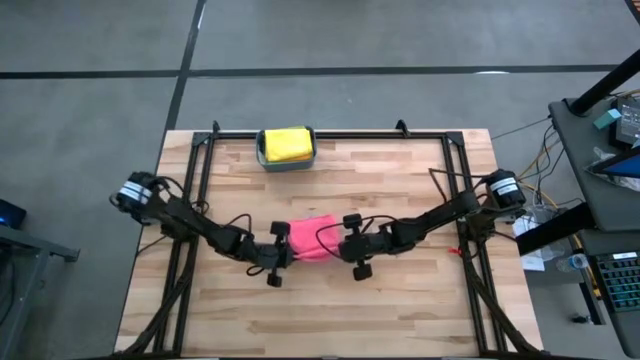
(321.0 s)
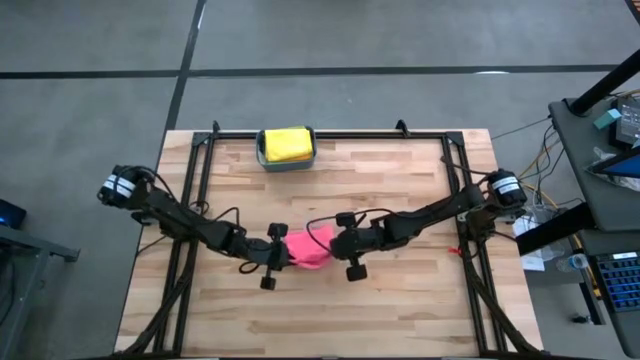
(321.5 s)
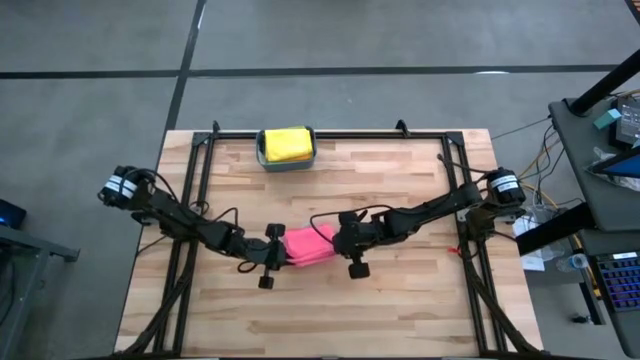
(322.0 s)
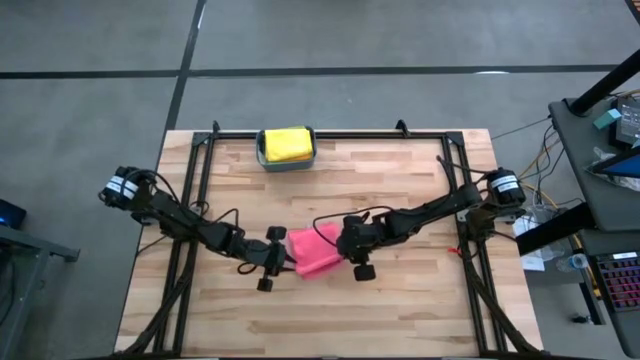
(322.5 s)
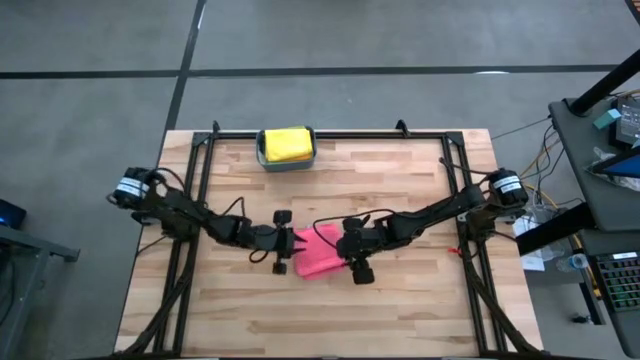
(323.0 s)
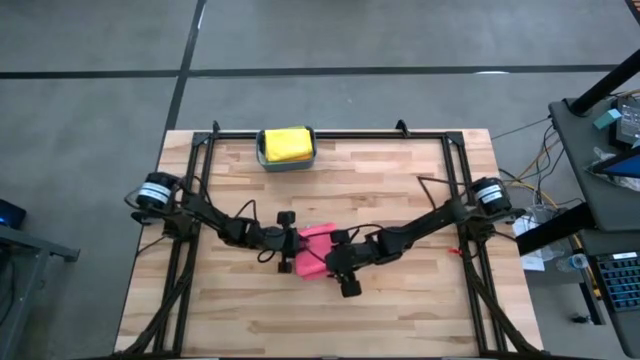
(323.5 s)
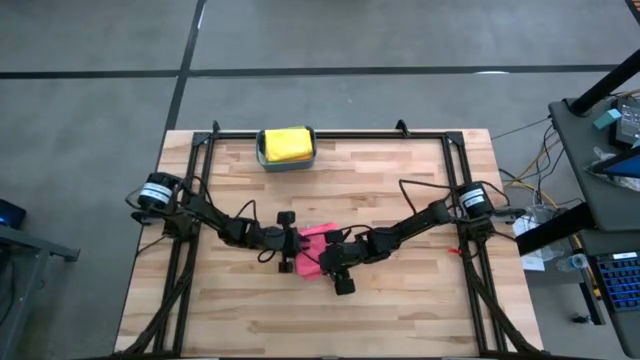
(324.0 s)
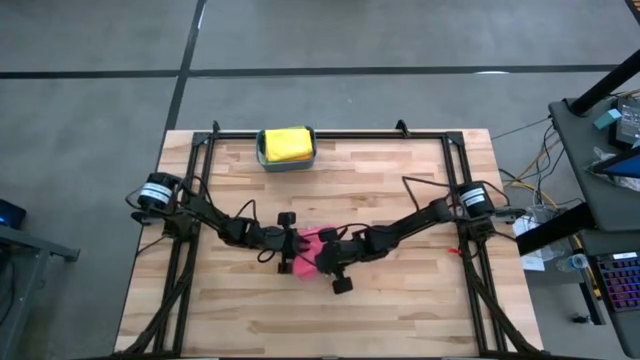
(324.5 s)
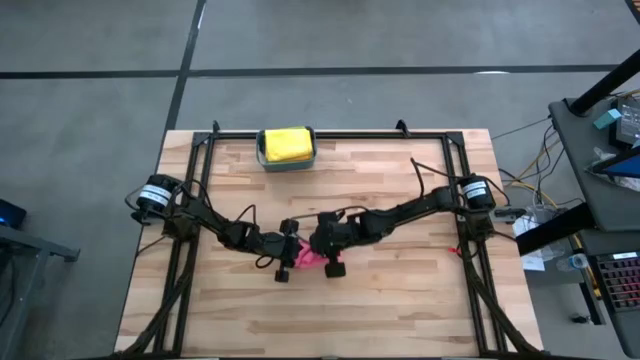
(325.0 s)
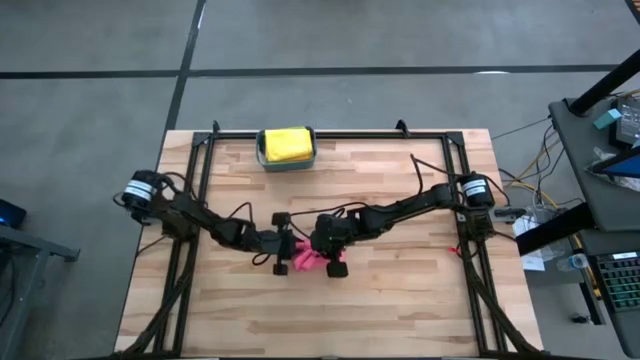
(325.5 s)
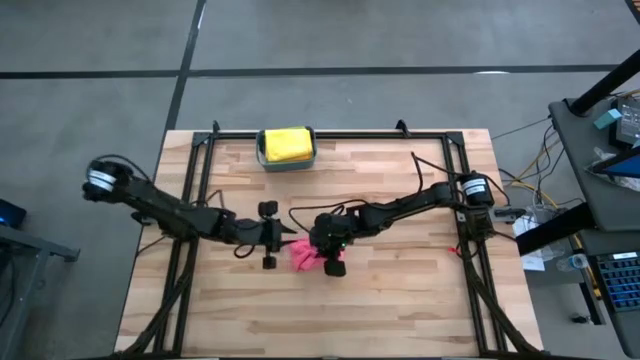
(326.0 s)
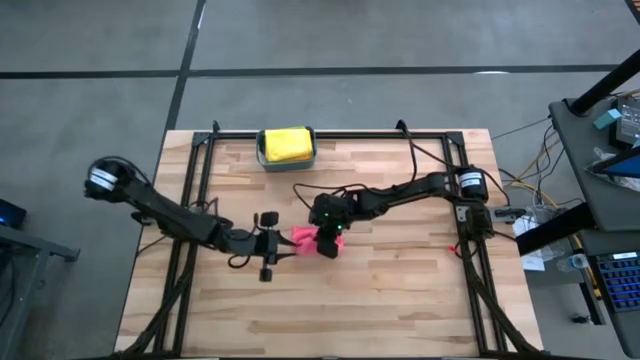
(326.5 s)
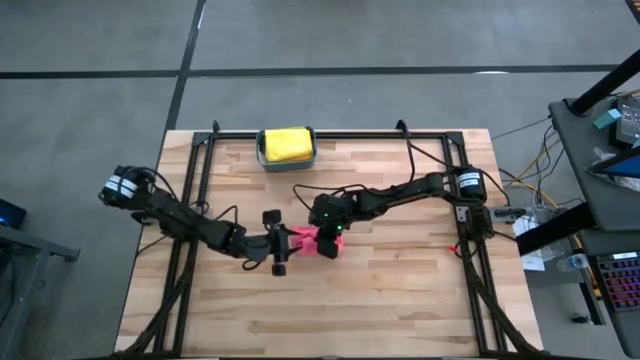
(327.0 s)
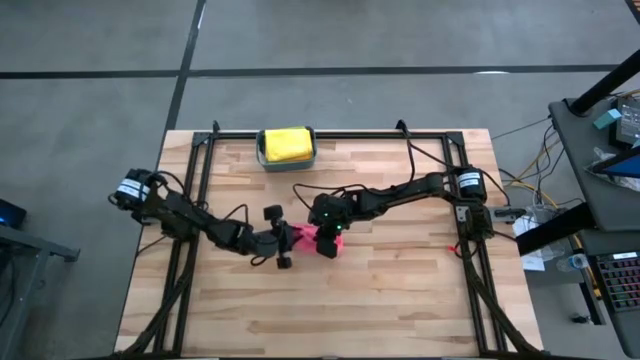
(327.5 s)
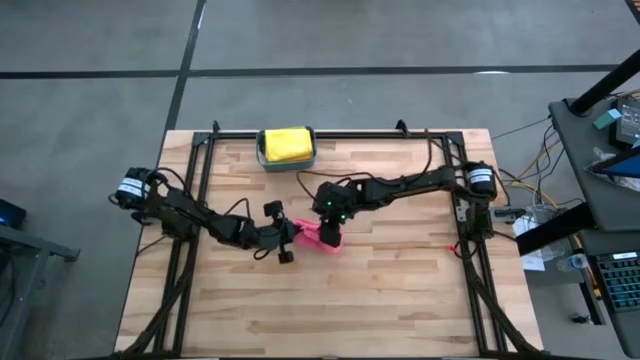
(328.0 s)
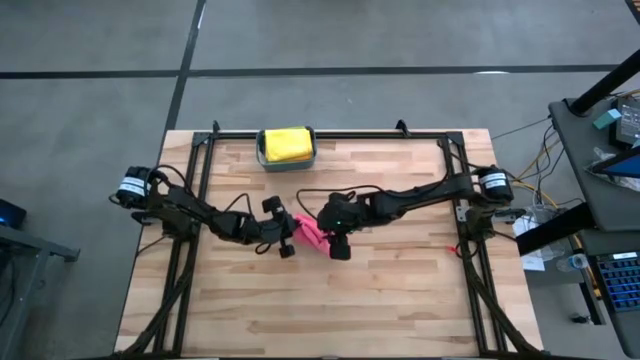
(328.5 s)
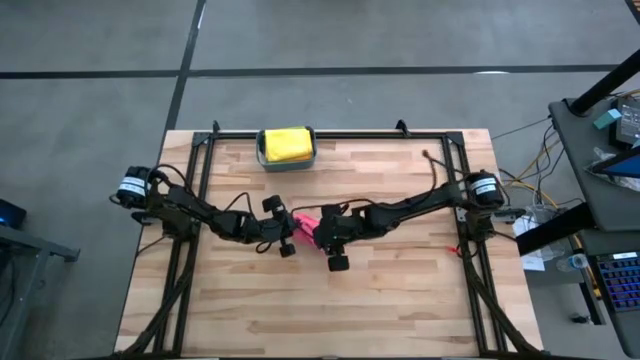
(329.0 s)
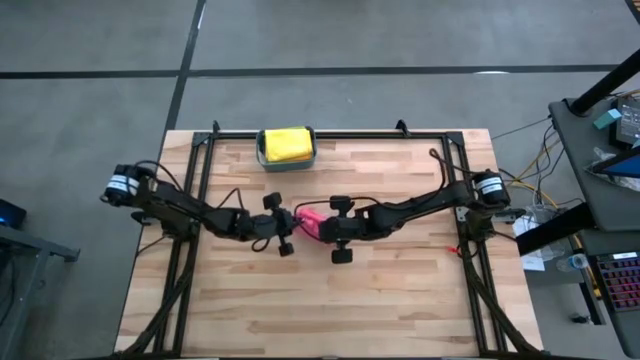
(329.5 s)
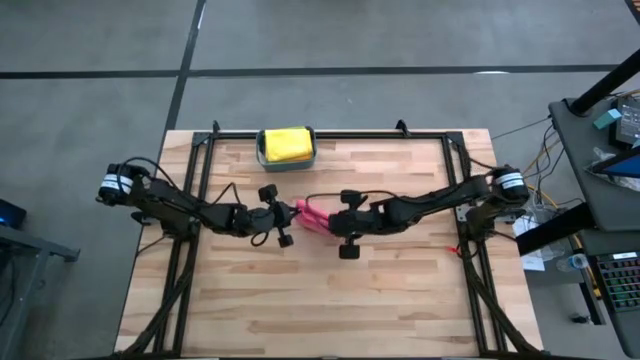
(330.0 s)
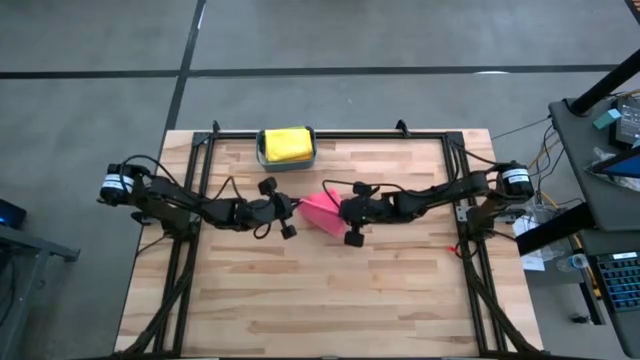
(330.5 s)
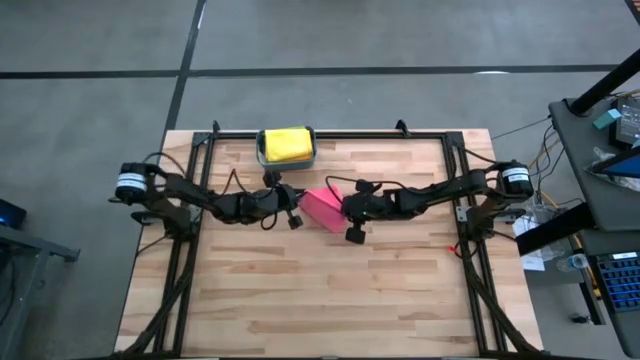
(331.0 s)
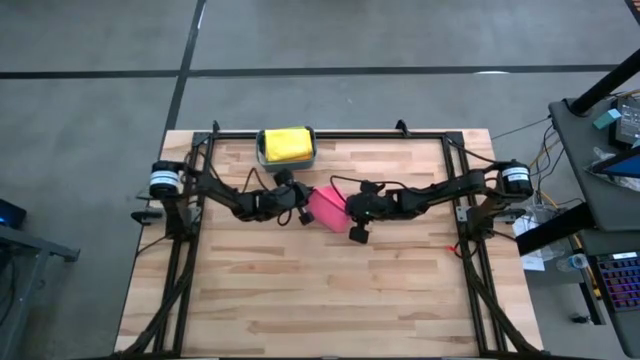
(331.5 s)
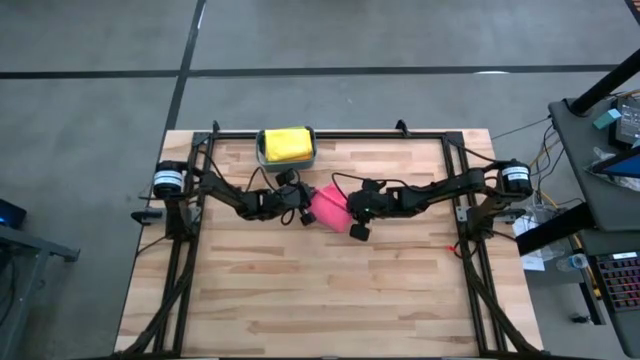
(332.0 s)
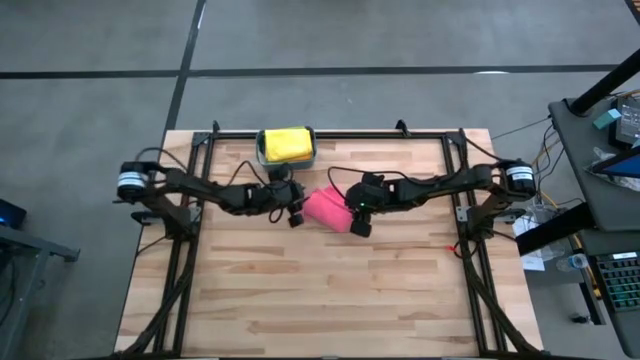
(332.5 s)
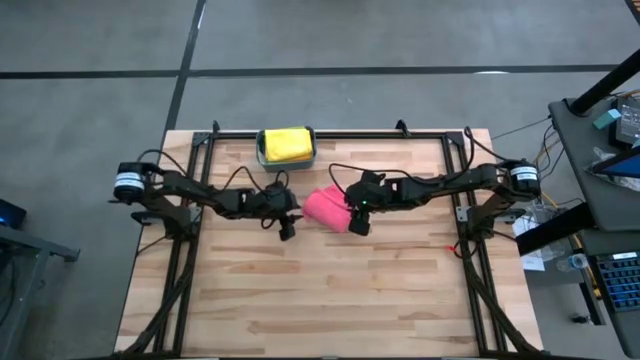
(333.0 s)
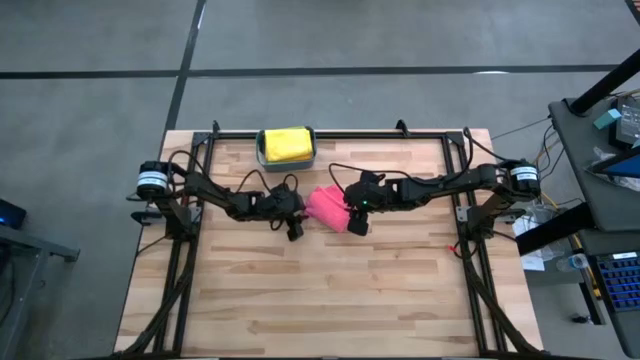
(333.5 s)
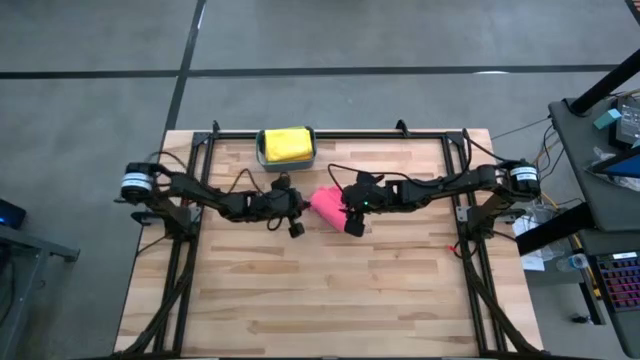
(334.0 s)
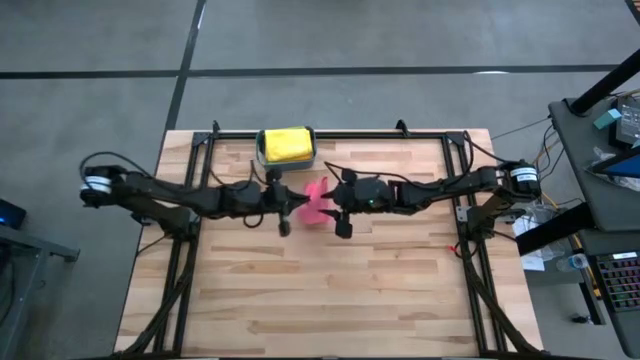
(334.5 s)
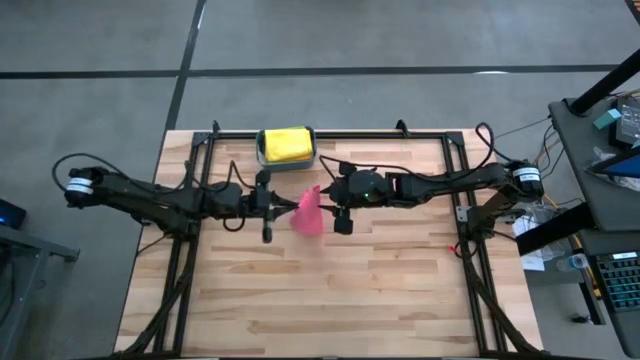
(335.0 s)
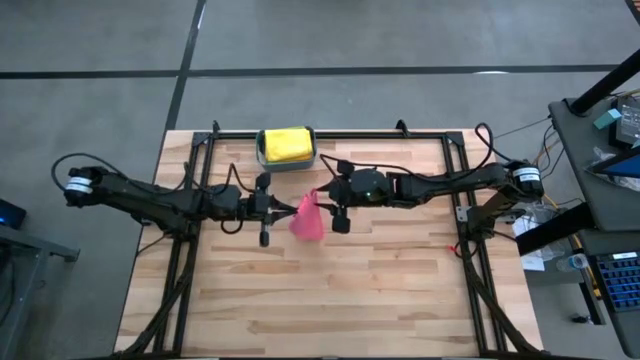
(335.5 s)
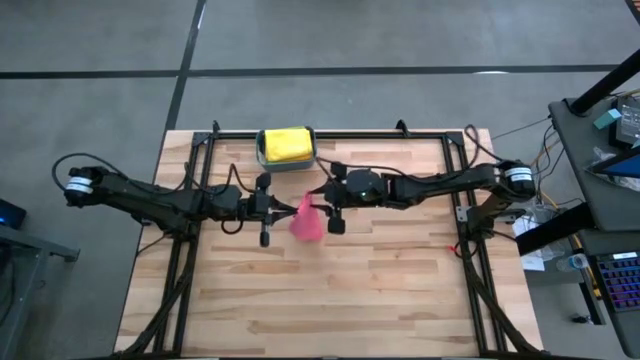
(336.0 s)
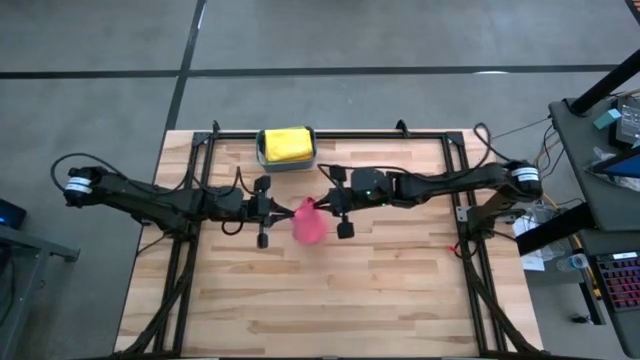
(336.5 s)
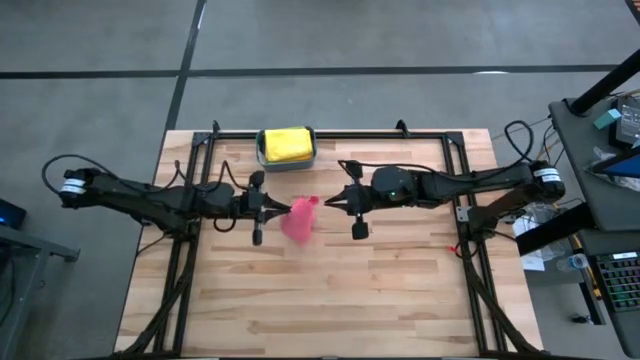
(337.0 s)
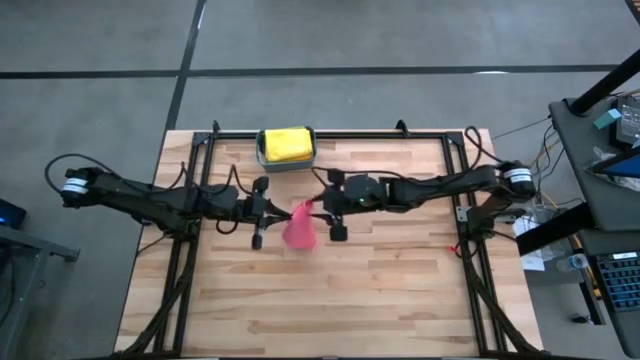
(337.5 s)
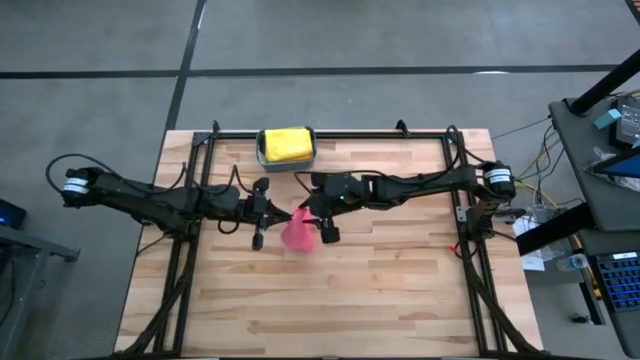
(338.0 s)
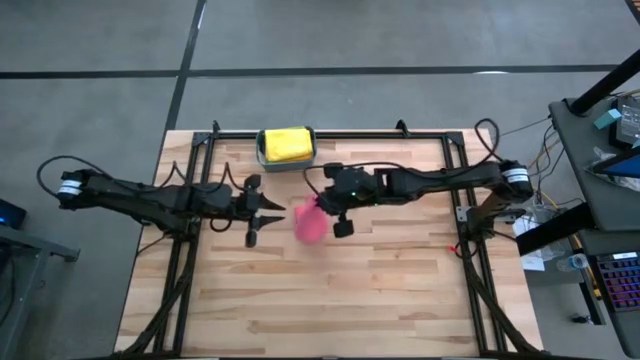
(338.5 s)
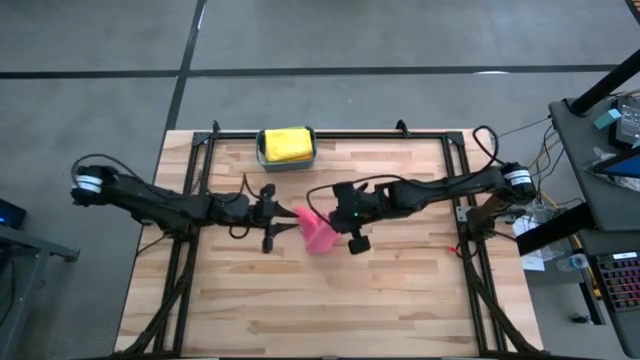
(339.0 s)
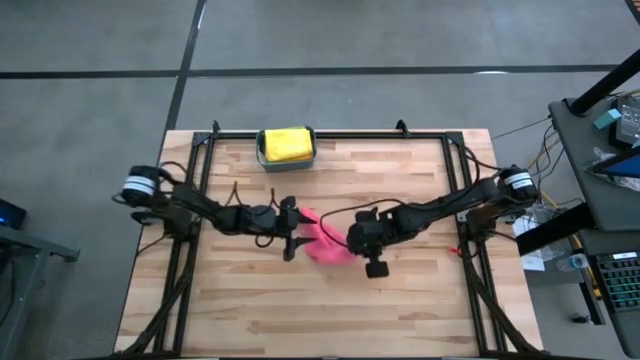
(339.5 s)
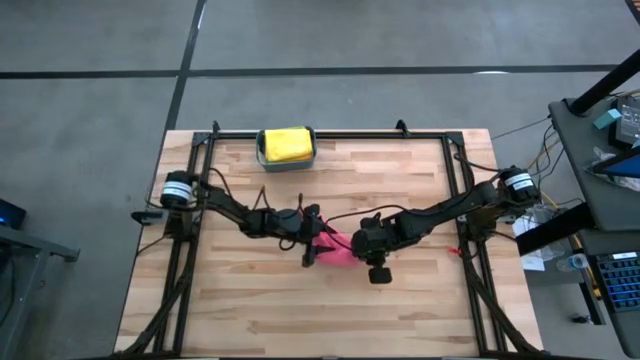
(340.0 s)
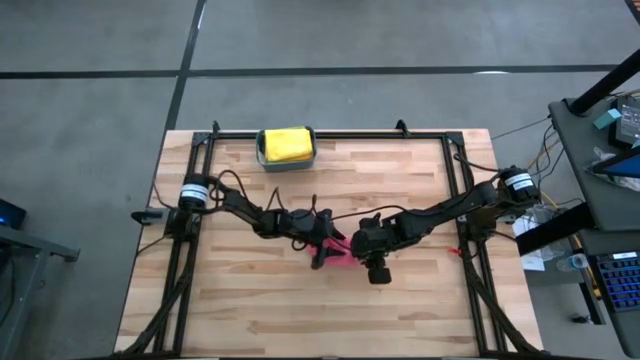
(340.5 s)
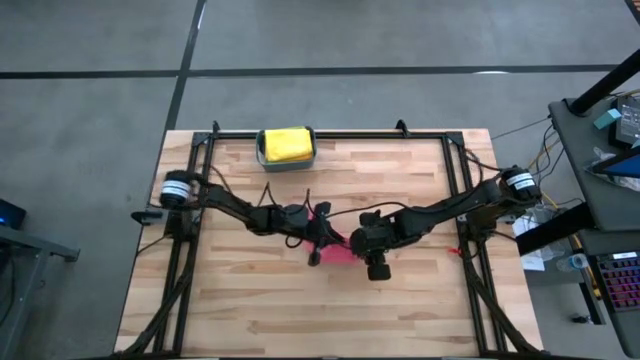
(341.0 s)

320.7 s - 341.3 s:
Task: Fold microfiber towels
Fold the pink towel
